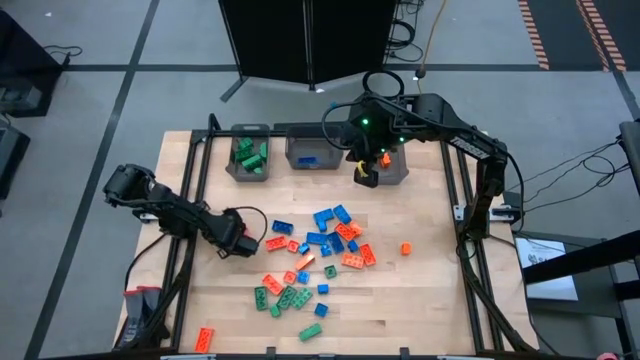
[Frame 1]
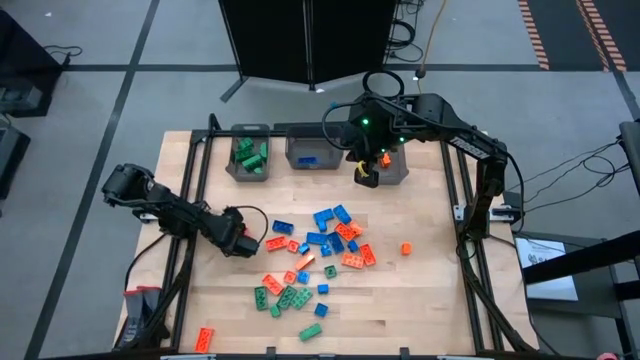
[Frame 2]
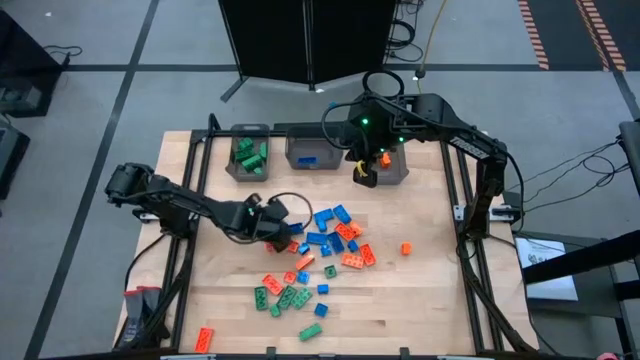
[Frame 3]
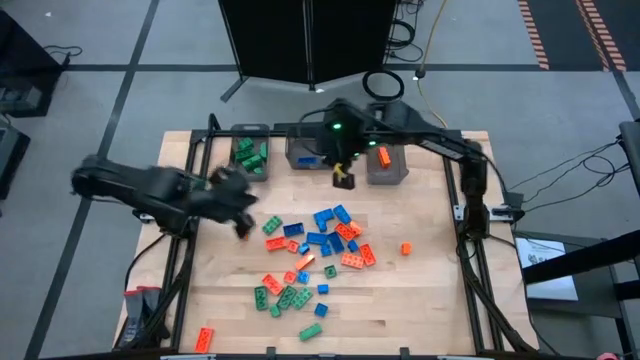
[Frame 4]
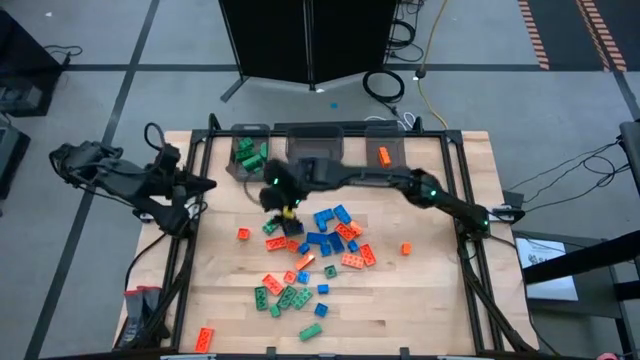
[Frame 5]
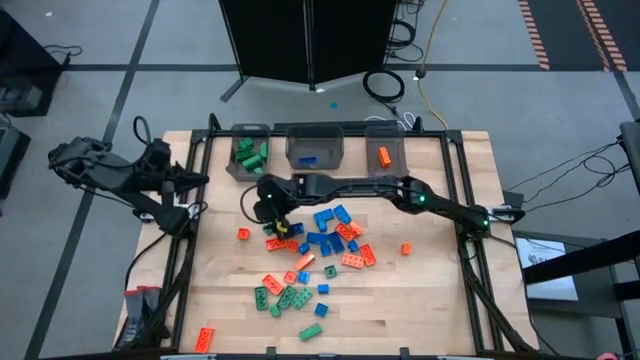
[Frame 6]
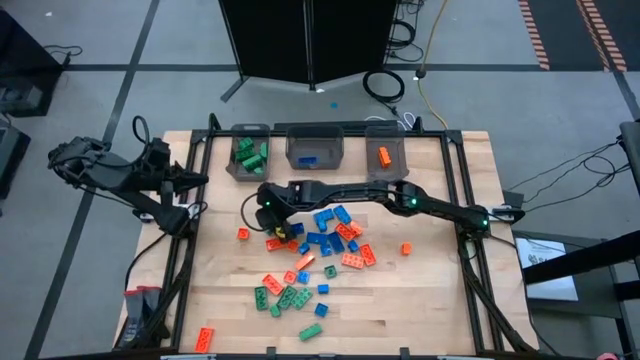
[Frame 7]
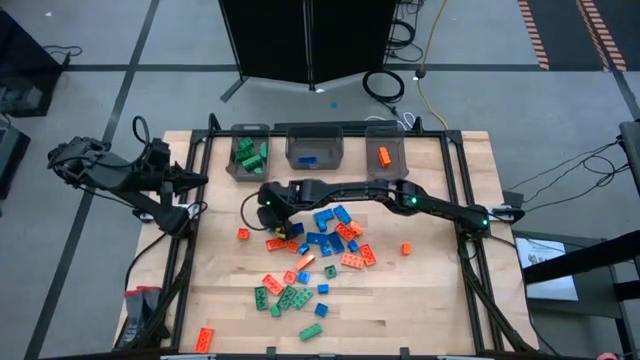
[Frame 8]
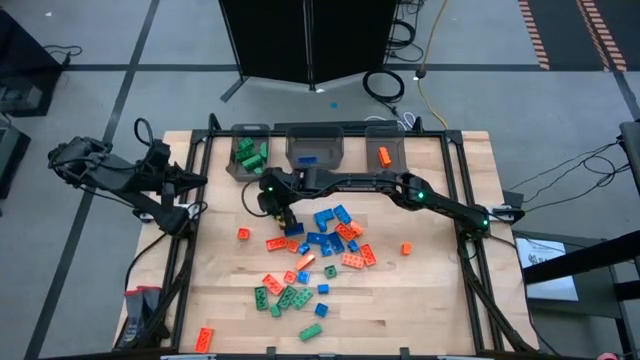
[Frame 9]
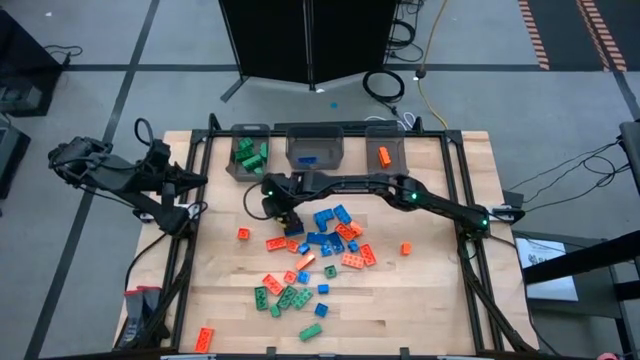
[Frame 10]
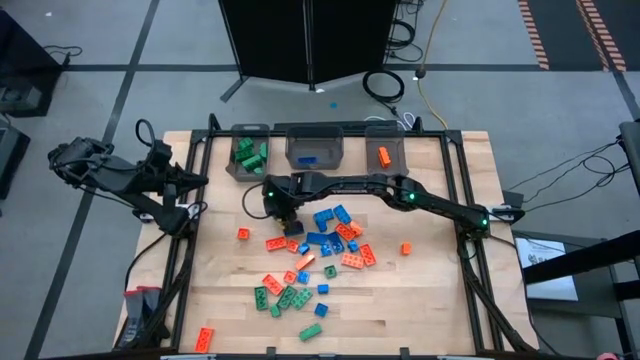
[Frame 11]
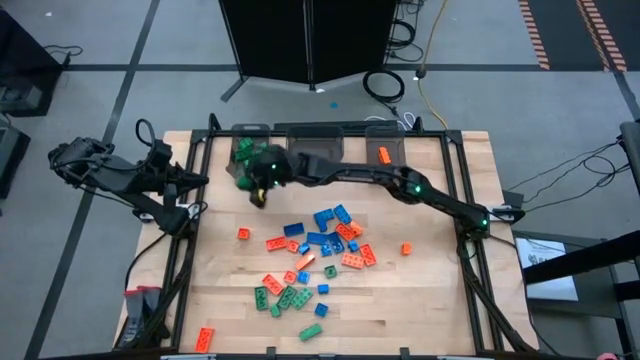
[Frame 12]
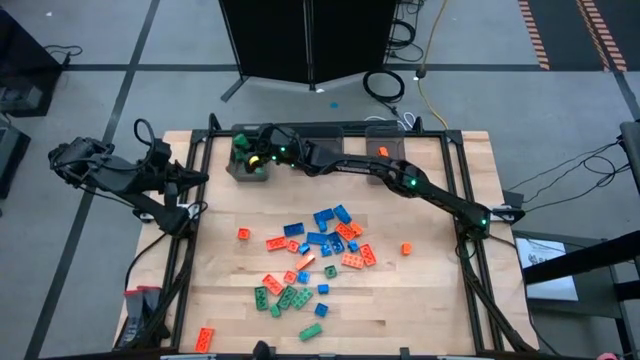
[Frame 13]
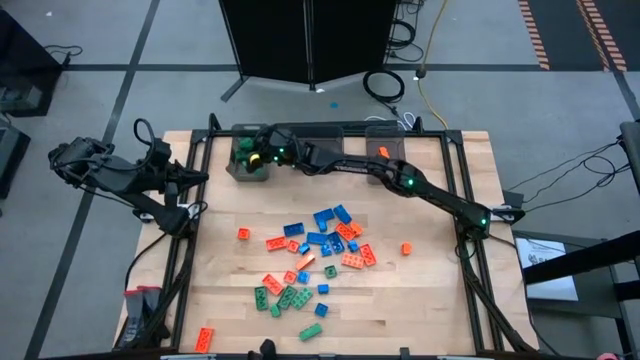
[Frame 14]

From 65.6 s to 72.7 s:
Task: Sort blocks
Put the green game piece into the left black bin

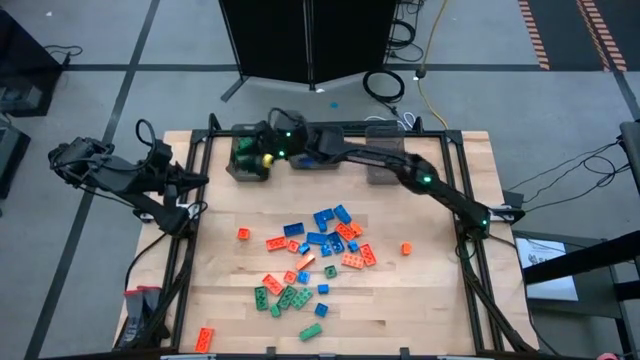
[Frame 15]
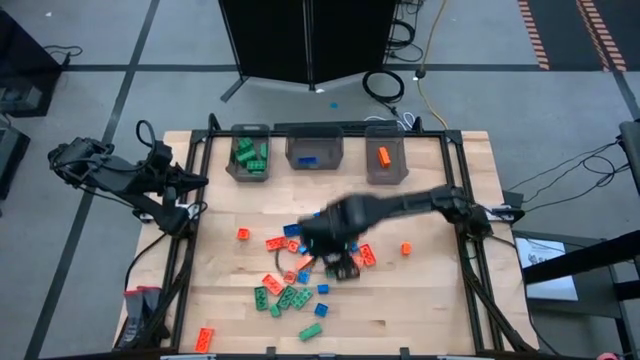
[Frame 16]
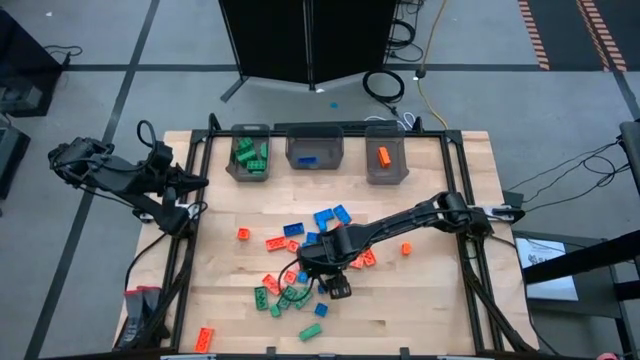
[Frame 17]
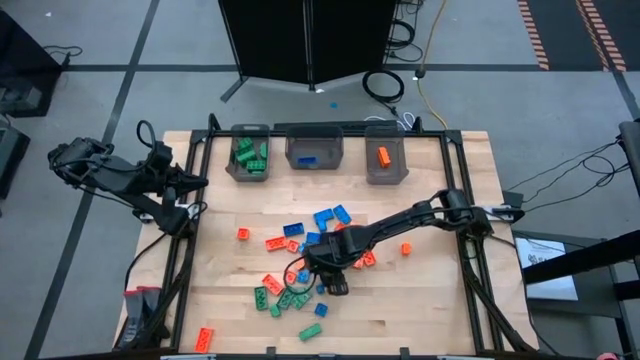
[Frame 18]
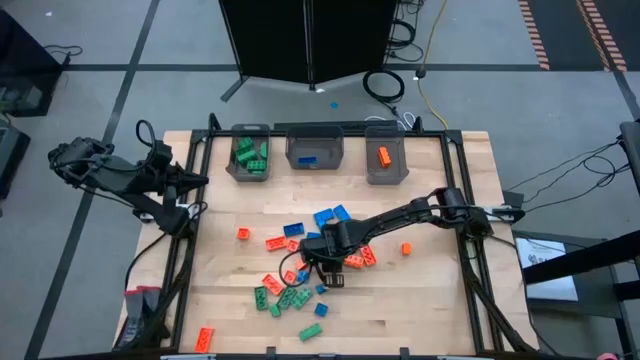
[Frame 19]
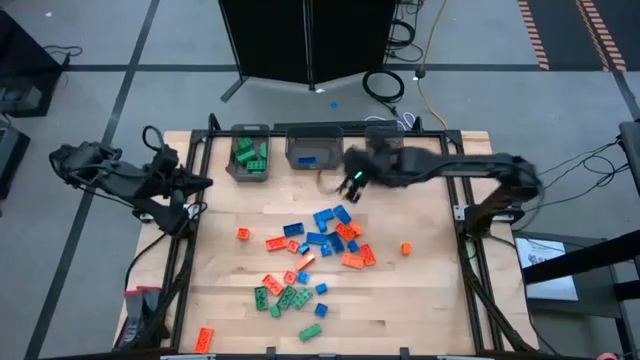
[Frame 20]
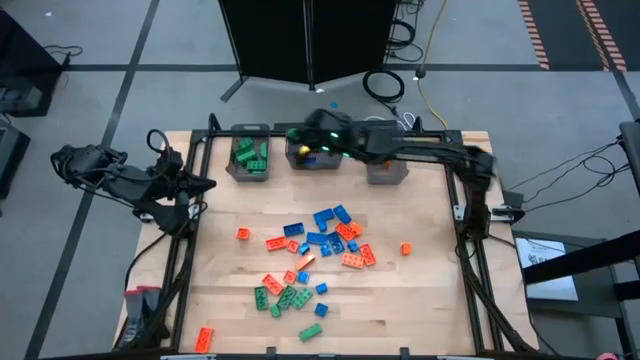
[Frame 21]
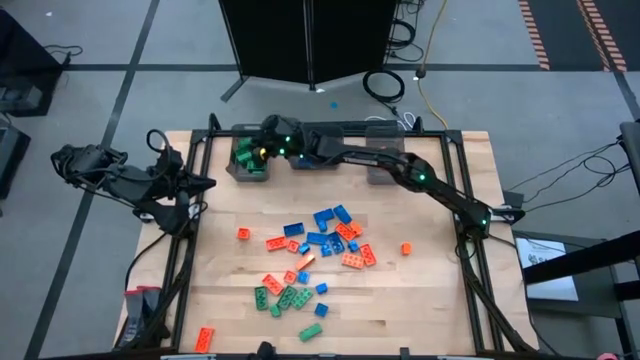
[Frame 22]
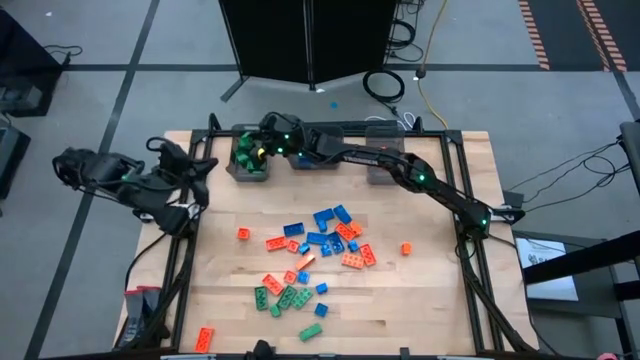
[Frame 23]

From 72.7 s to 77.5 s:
Put the green game piece into the left black bin

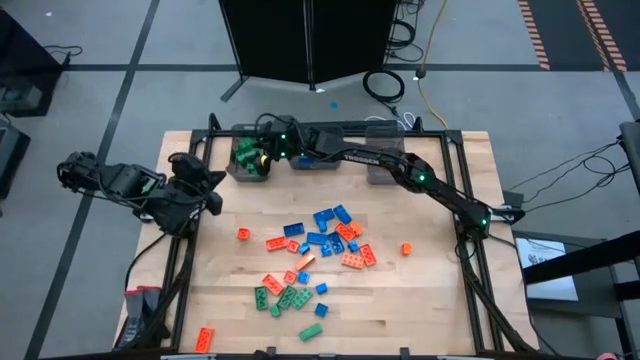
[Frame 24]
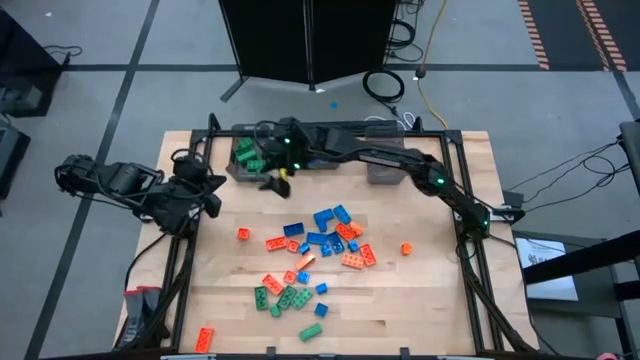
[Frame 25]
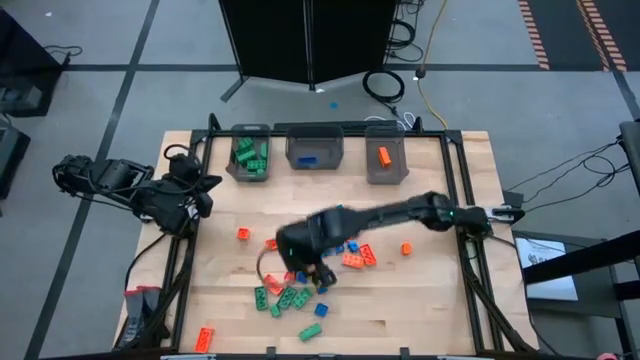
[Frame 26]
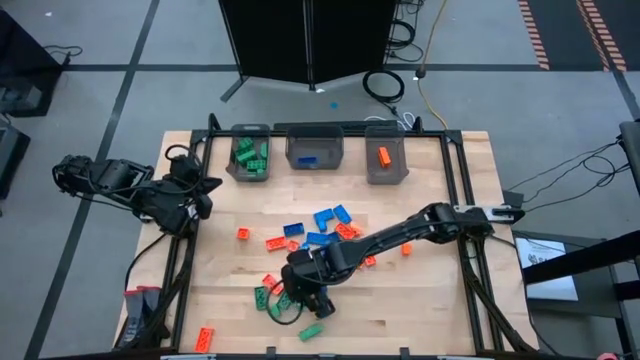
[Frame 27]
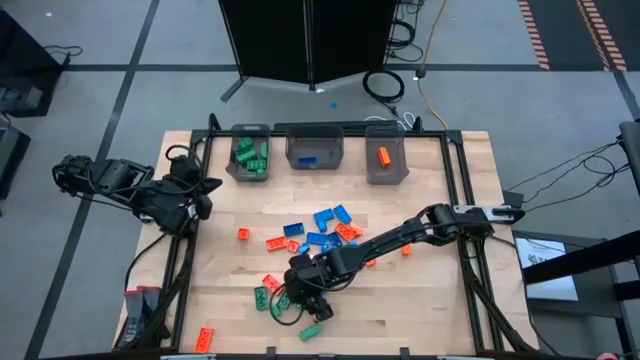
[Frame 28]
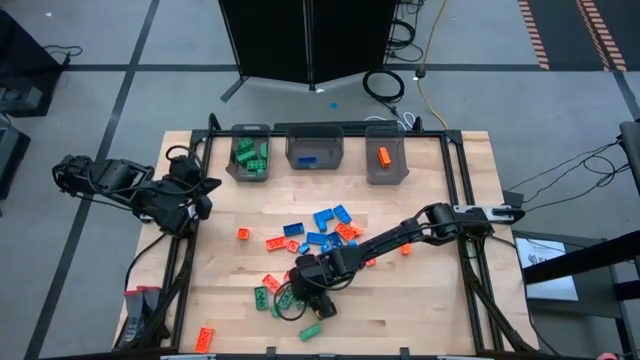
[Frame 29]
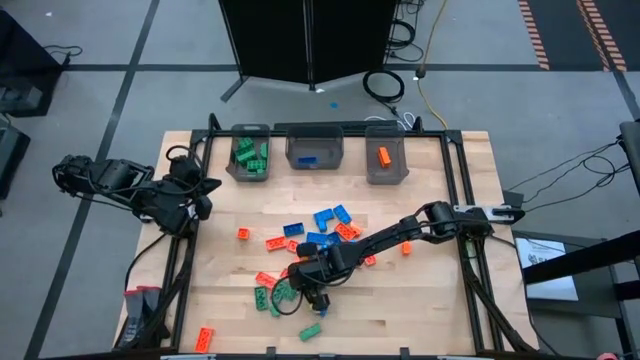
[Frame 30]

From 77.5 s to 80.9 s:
Put the green game piece into the left black bin

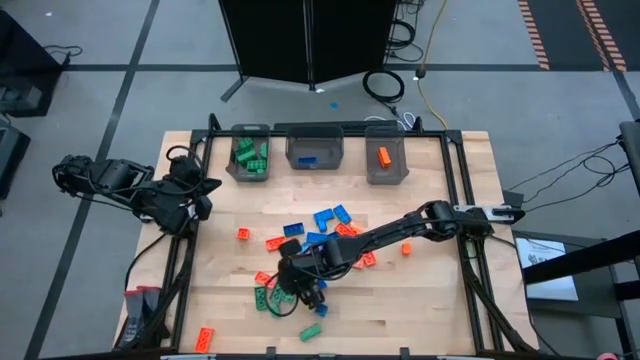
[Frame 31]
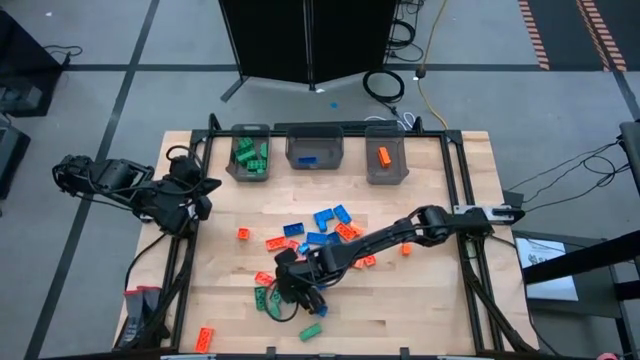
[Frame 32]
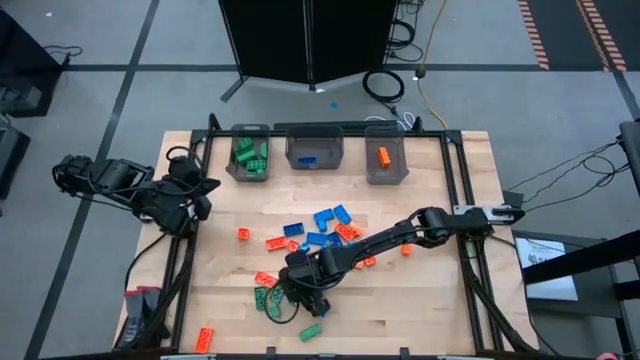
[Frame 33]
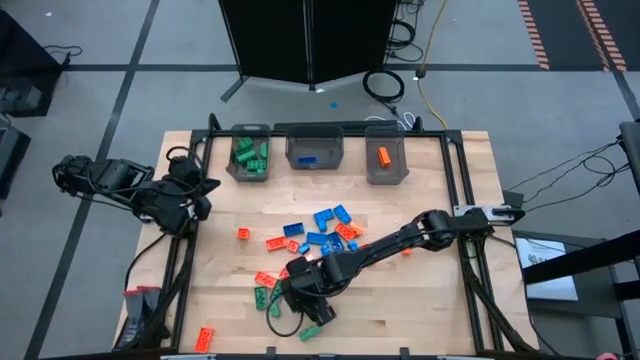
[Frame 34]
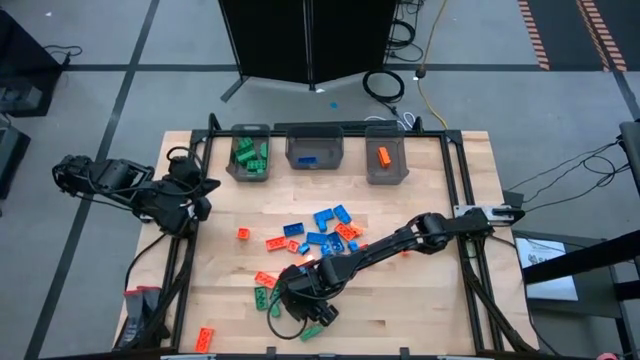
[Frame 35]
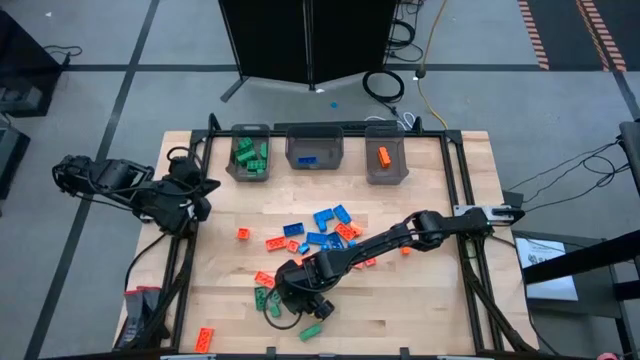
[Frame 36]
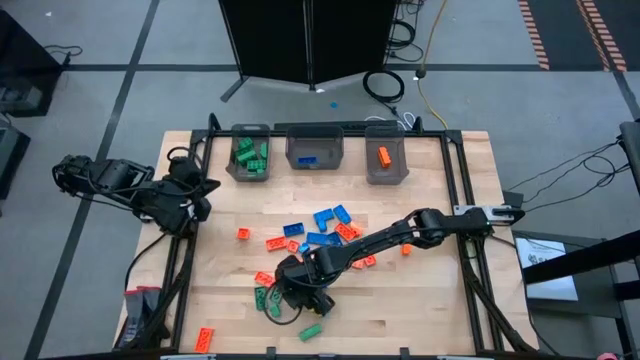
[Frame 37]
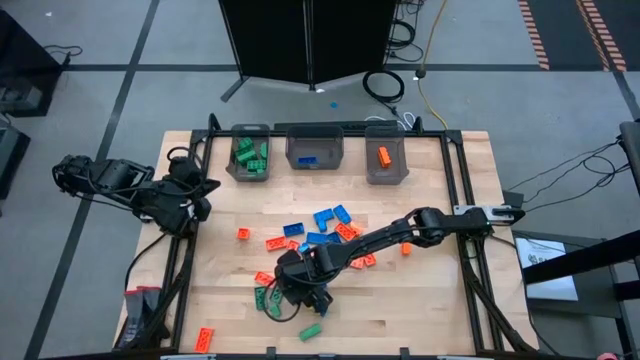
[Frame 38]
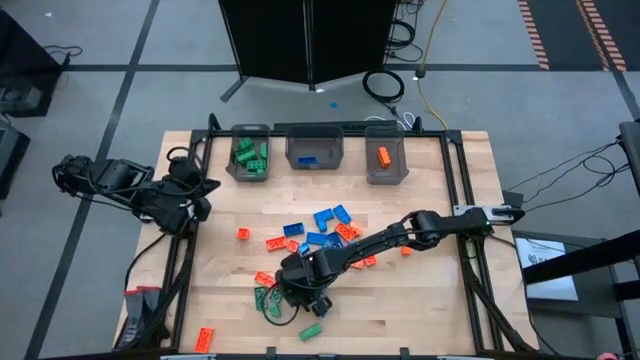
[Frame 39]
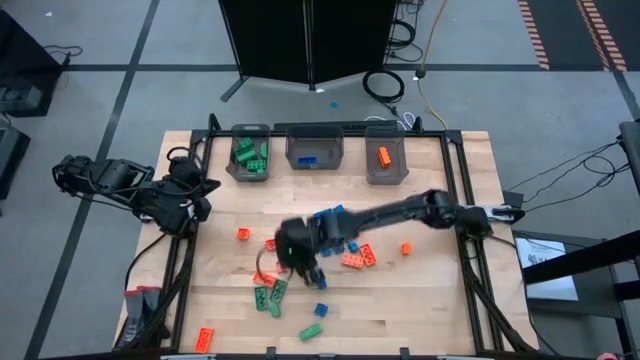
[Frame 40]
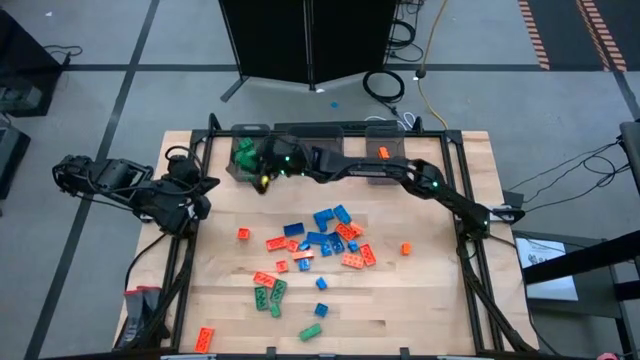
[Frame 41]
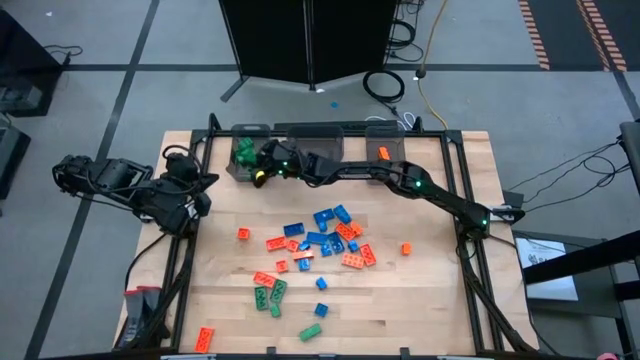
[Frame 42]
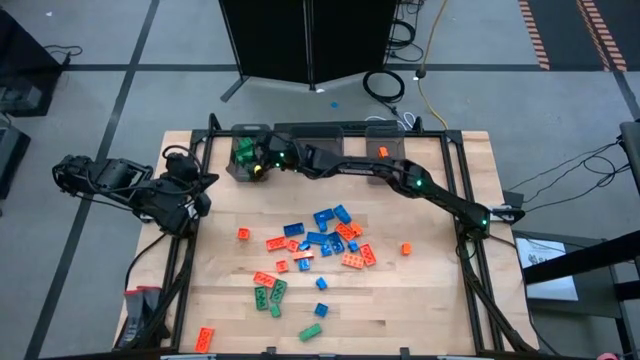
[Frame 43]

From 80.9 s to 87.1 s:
Put the green game piece into the left black bin
